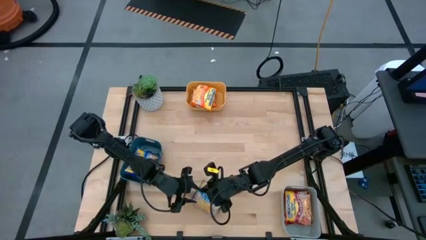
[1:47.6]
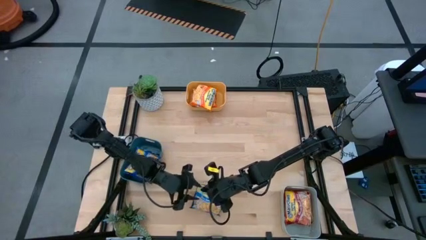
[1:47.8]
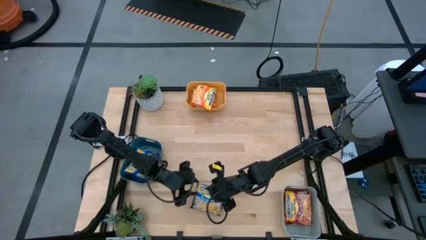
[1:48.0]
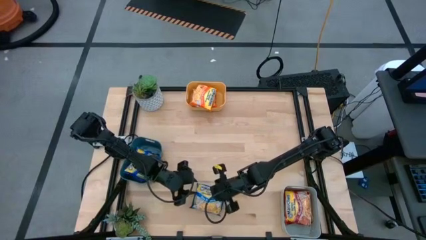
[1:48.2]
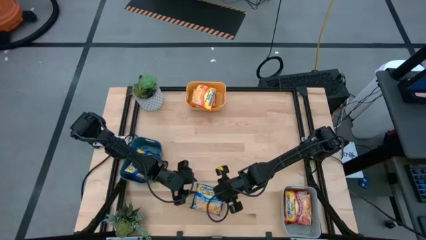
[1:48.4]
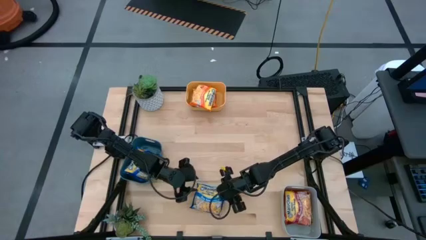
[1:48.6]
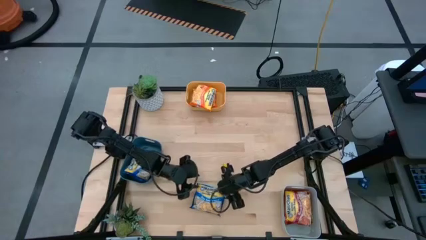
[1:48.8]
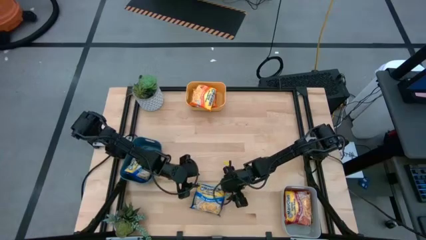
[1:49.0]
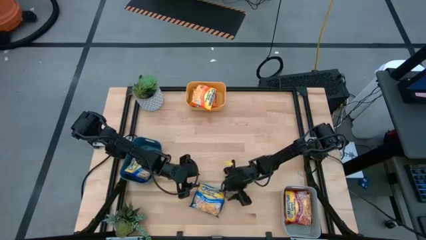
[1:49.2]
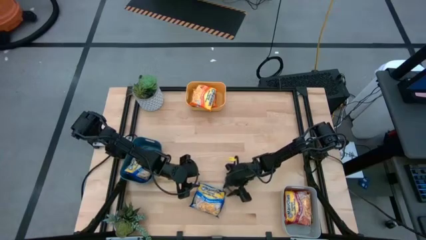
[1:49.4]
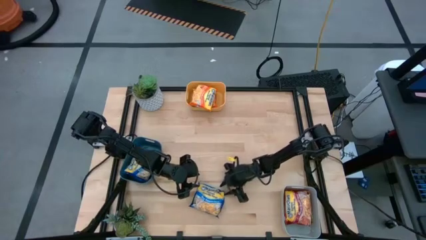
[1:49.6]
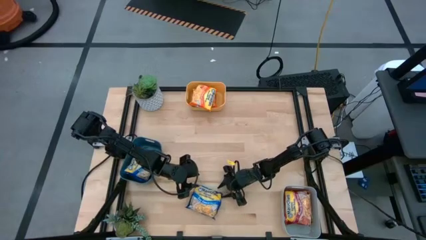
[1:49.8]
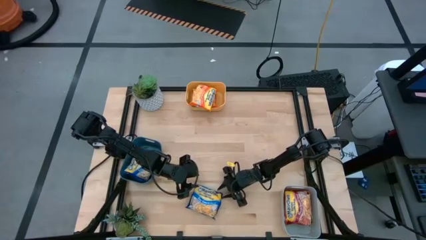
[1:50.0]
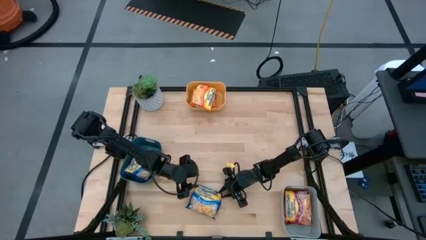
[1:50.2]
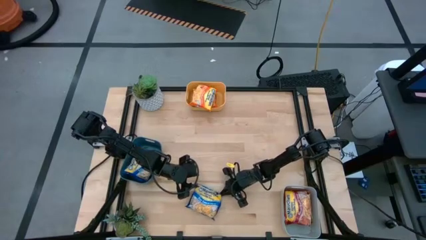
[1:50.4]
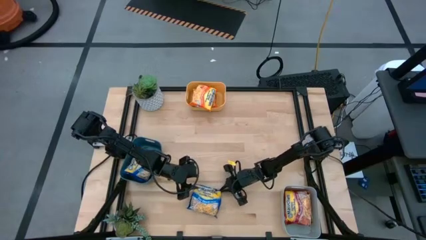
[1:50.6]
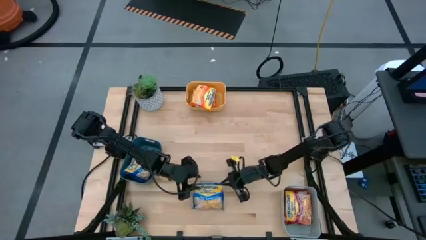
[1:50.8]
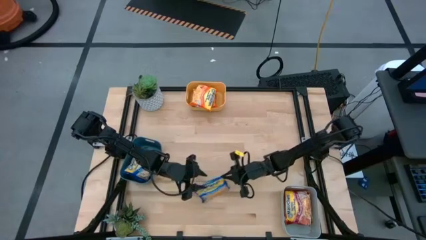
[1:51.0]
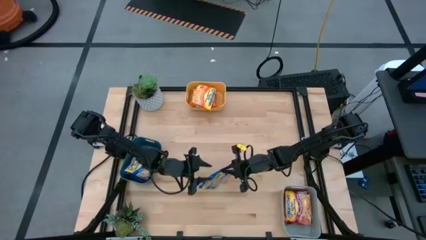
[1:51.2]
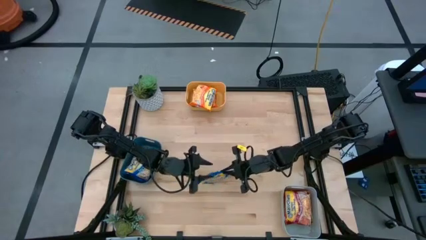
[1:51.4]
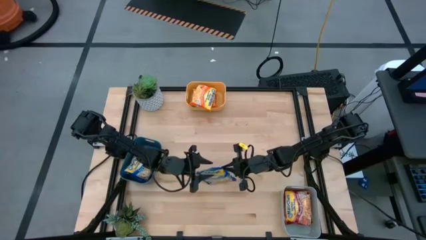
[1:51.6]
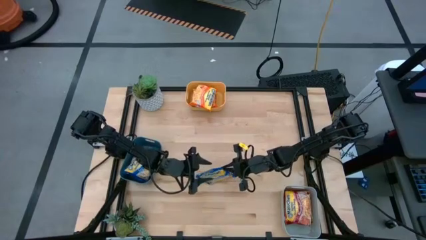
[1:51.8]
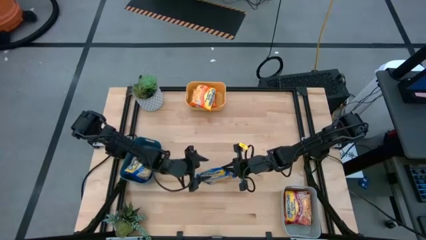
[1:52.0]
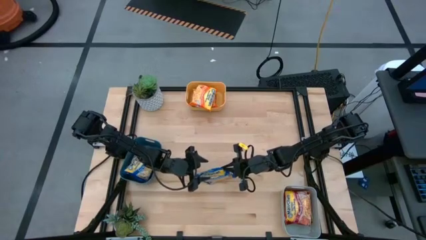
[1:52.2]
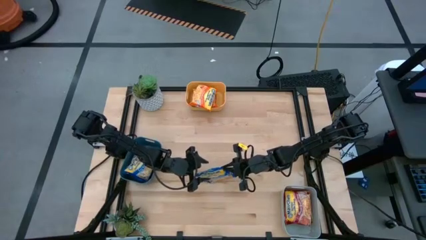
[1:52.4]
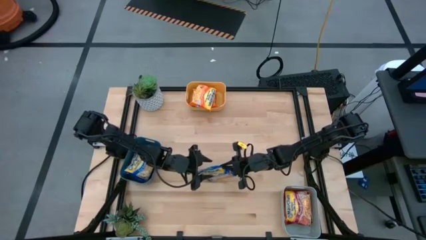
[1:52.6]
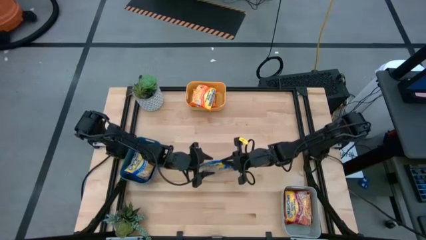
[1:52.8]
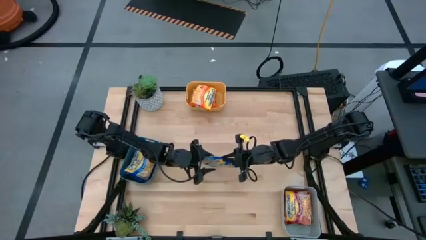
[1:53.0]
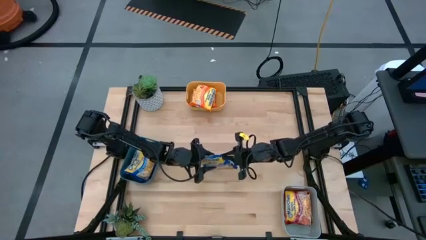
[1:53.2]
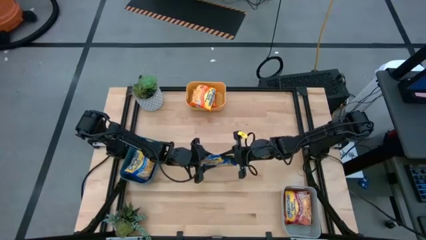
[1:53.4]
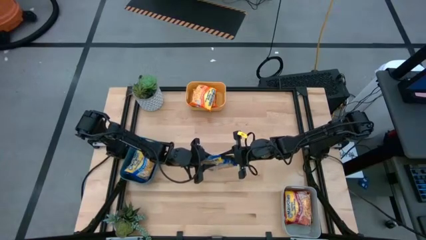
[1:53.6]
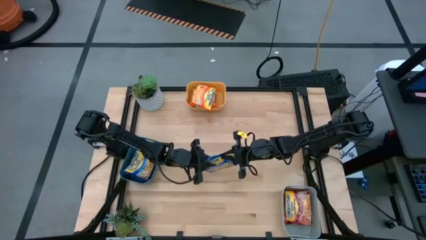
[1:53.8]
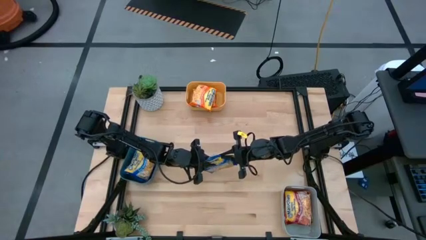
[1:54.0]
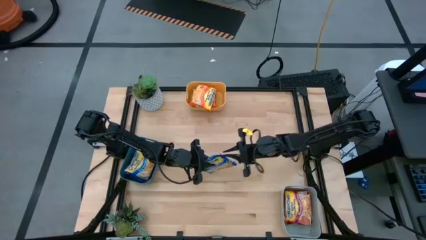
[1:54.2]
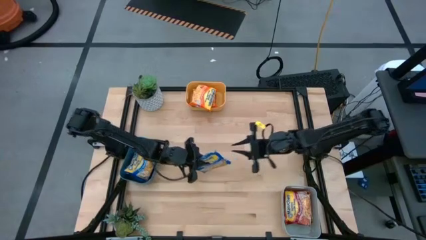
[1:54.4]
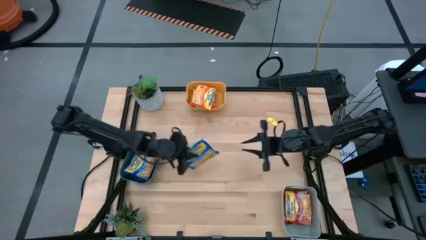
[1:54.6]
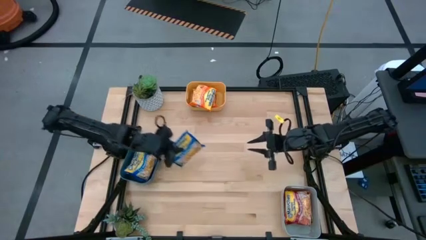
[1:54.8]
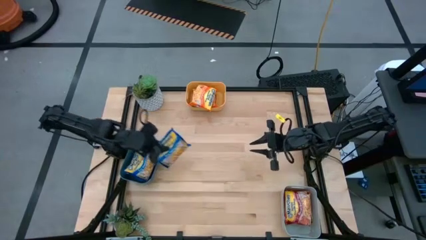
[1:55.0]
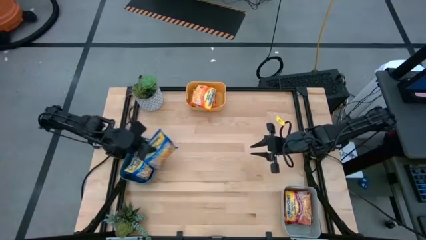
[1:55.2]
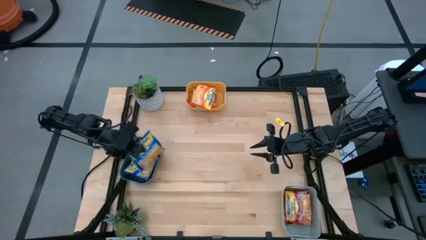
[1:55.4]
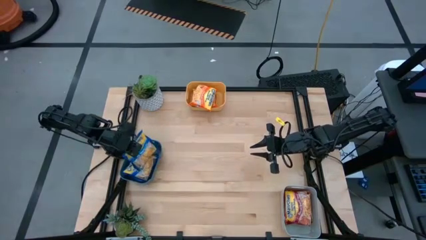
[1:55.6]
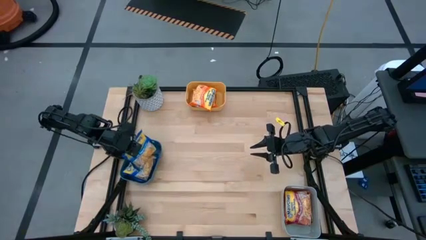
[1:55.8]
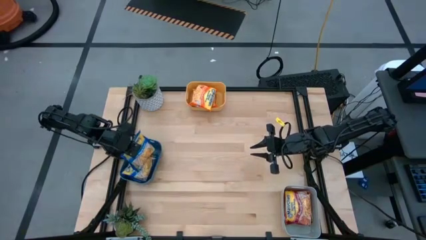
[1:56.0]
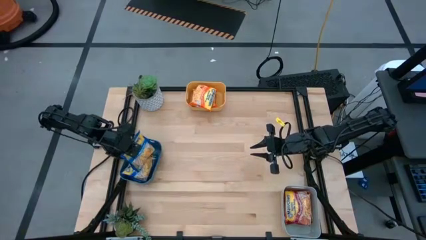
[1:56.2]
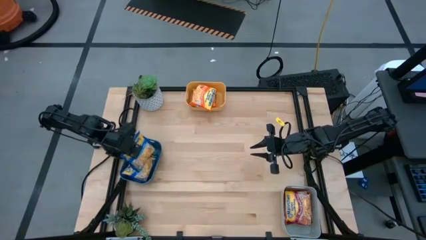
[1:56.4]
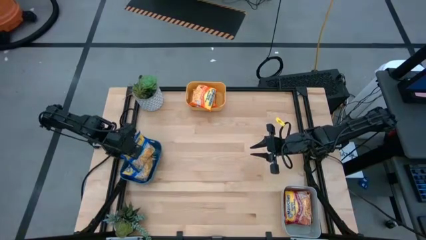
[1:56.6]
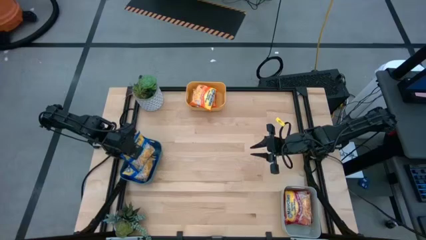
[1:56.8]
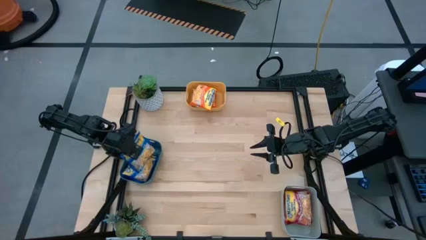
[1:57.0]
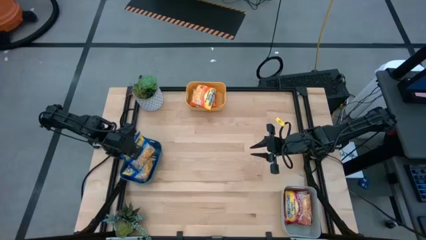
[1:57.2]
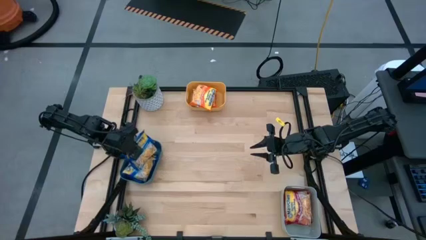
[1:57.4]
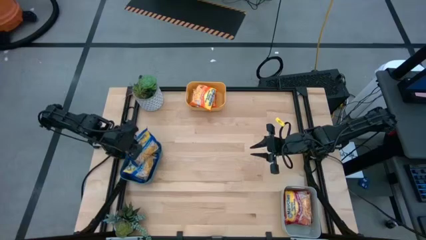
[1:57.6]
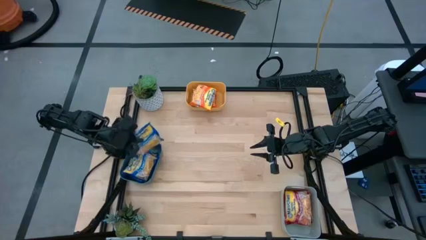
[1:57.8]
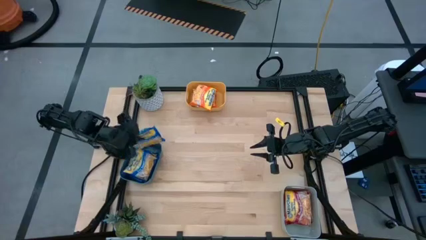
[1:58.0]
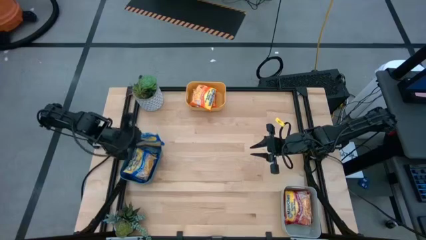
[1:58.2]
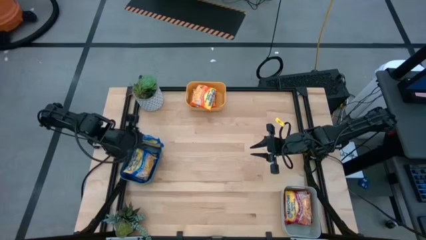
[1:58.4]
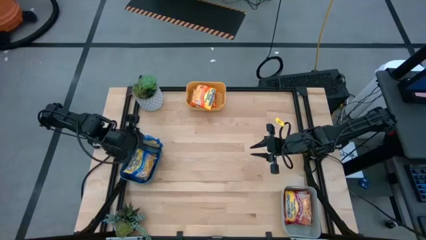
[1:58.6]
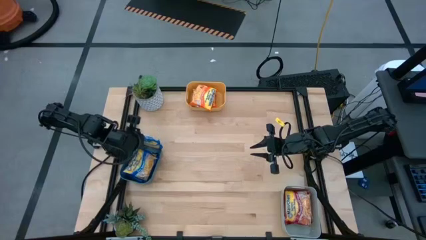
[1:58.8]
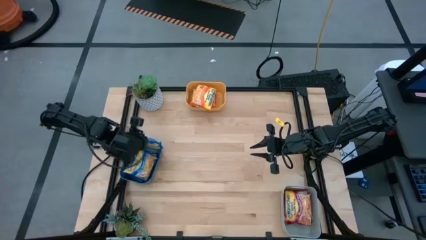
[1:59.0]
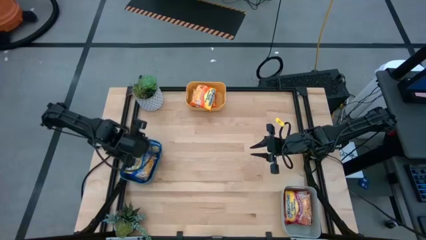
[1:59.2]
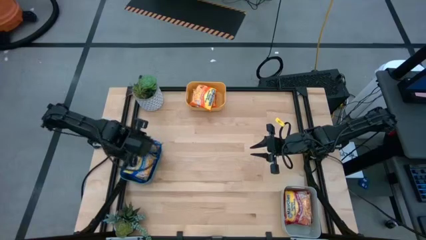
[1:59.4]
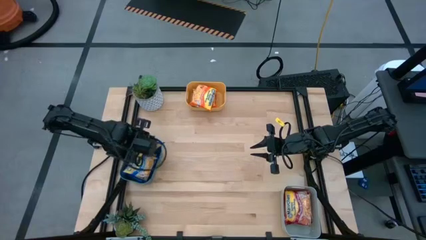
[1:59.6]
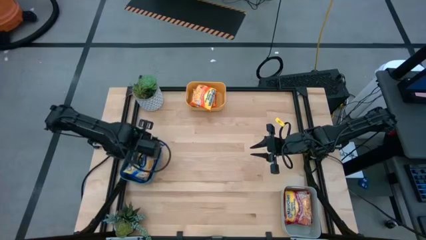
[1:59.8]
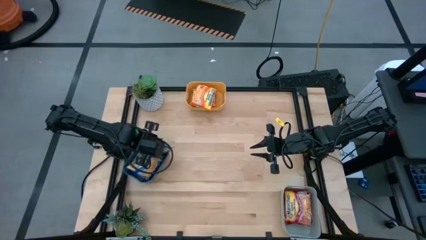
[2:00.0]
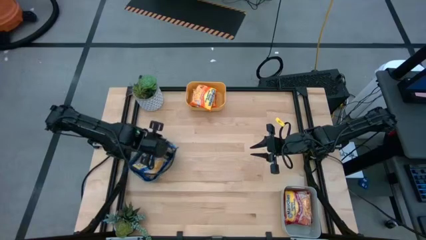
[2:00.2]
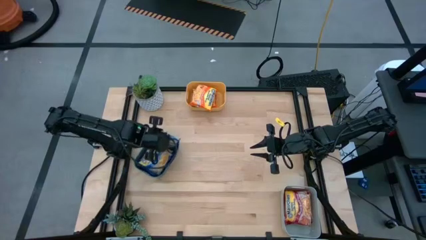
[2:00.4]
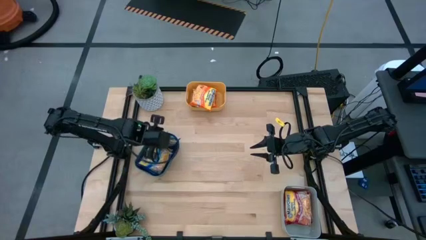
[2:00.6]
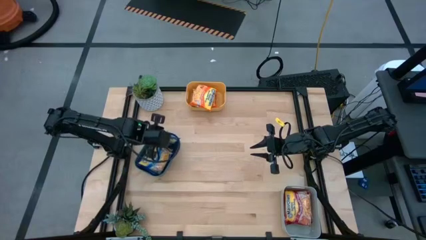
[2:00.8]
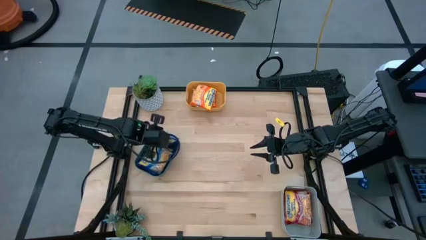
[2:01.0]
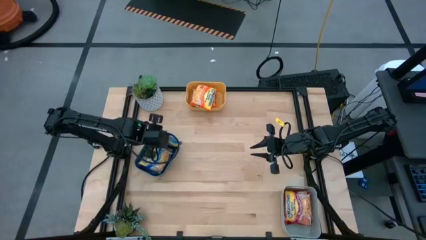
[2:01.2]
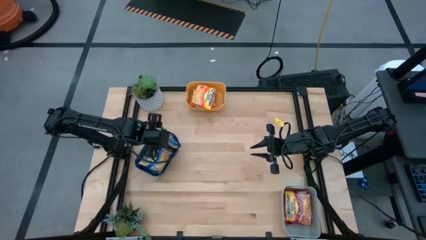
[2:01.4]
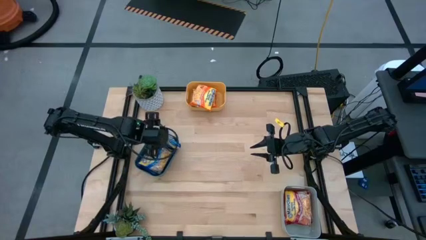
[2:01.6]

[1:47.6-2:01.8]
Task: Sort Maruchan noodles
Put the blue noodle pack into the blue bin

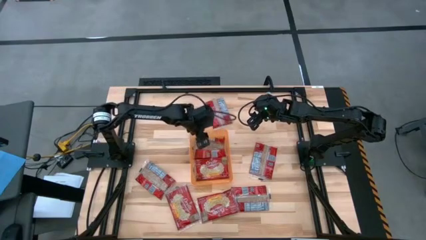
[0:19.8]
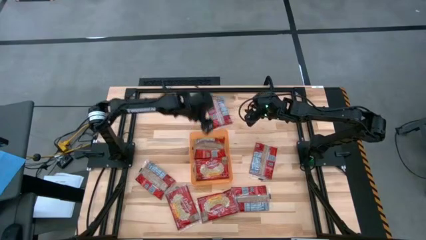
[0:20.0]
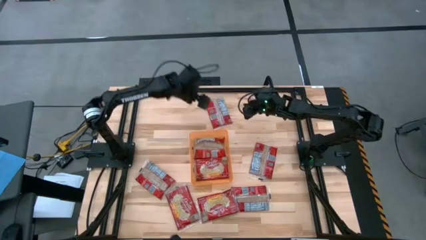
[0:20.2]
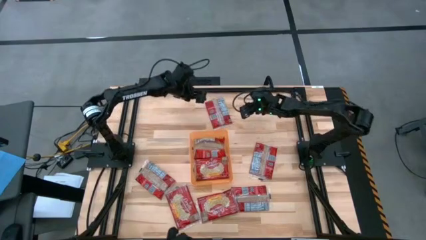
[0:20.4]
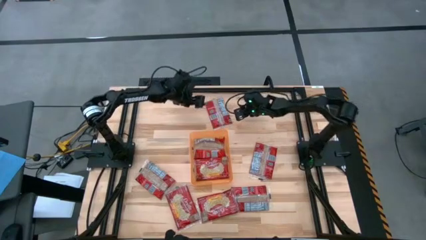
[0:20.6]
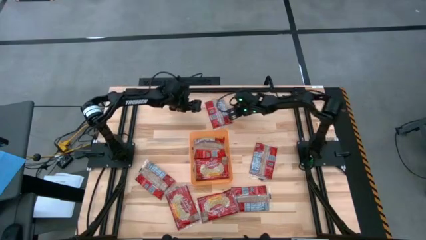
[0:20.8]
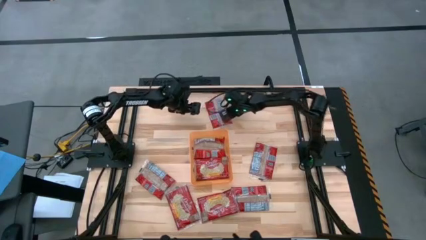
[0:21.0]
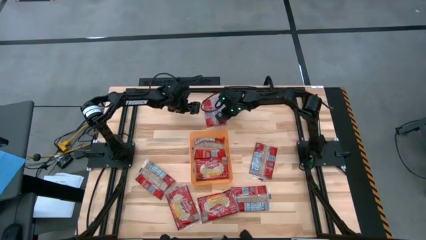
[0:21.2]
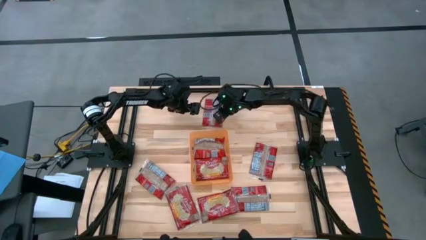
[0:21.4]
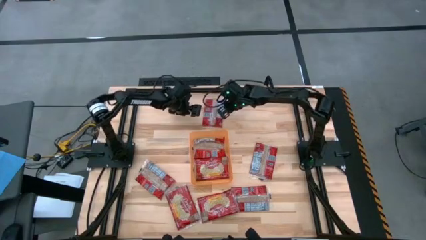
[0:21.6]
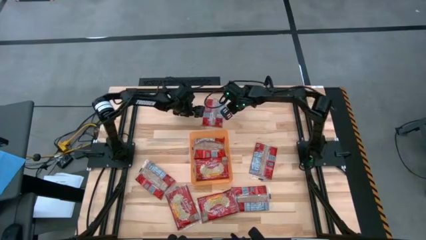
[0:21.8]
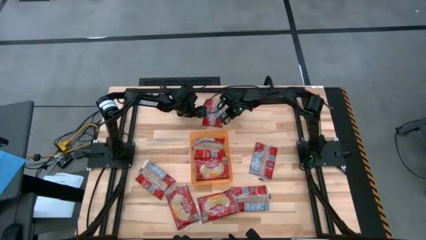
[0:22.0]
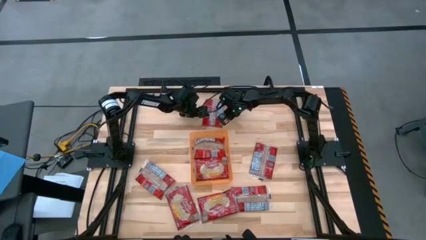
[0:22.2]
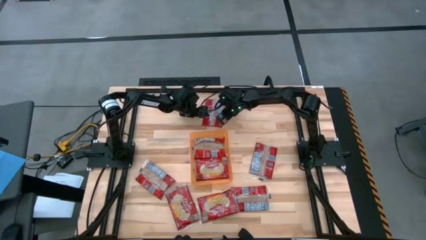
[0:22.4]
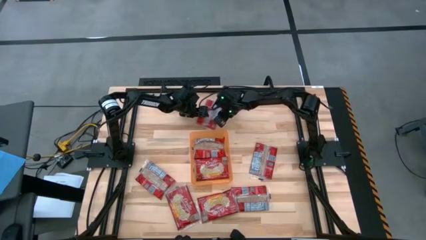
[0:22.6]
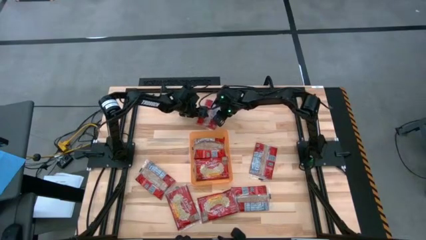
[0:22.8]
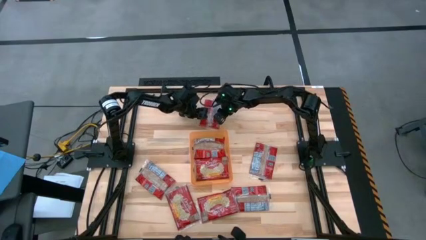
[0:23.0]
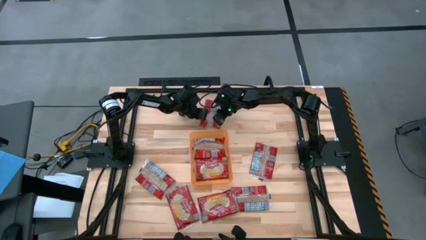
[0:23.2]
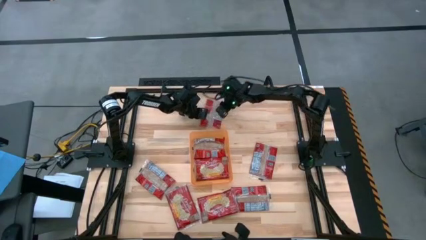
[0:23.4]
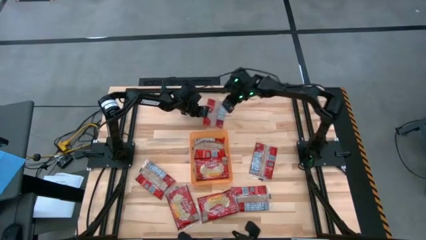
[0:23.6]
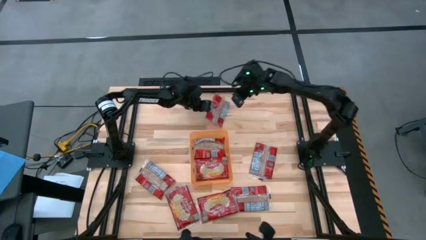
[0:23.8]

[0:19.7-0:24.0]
Task: Sort popcorn bags into baskets
Put the red popcorn bag into the orange bin
